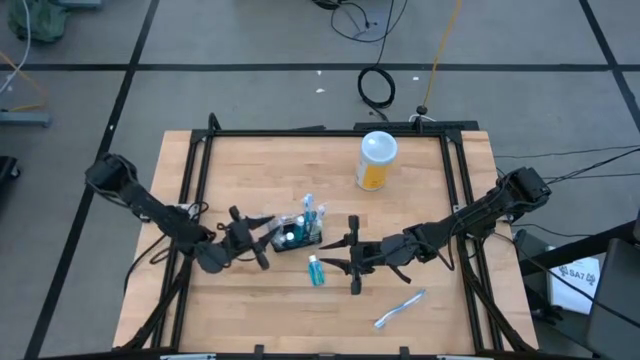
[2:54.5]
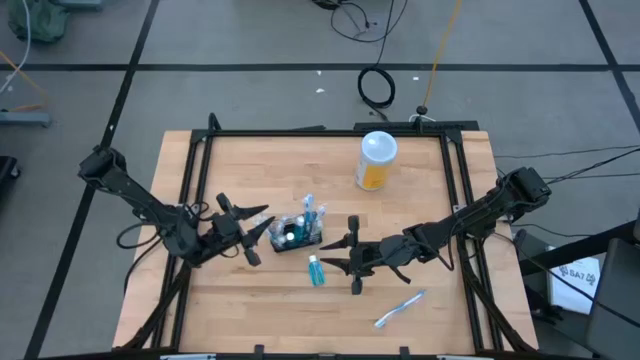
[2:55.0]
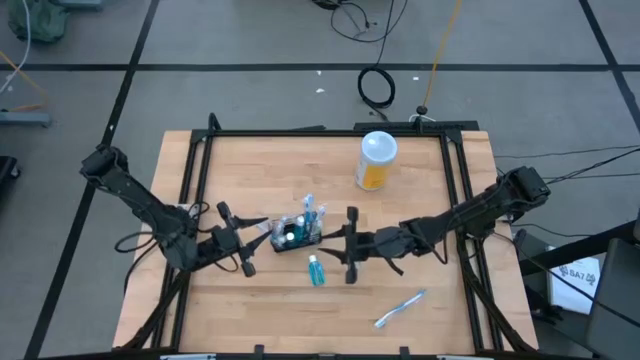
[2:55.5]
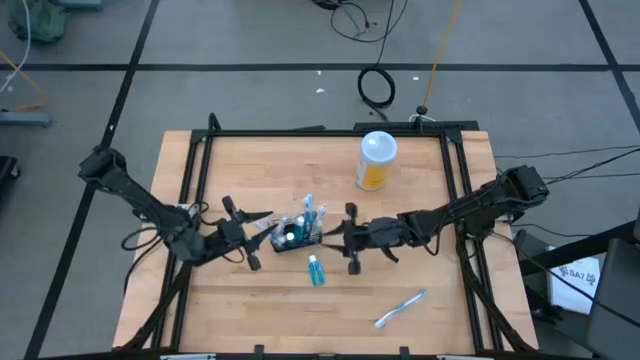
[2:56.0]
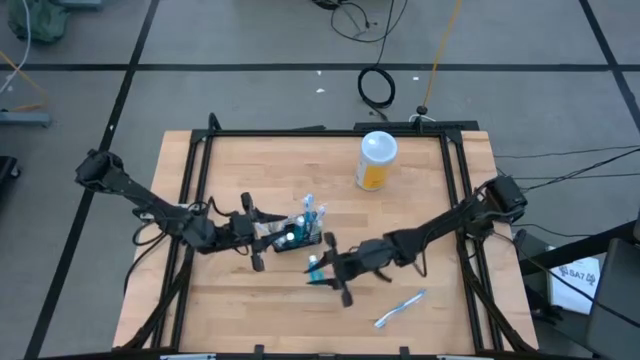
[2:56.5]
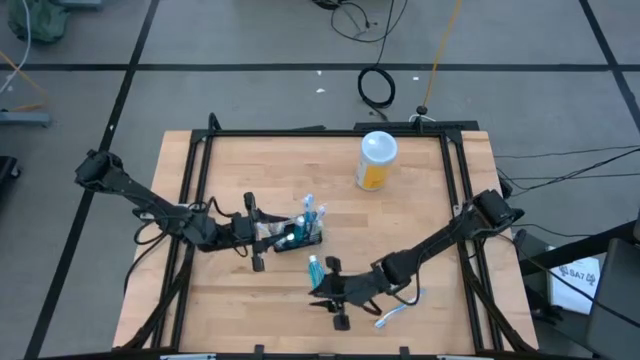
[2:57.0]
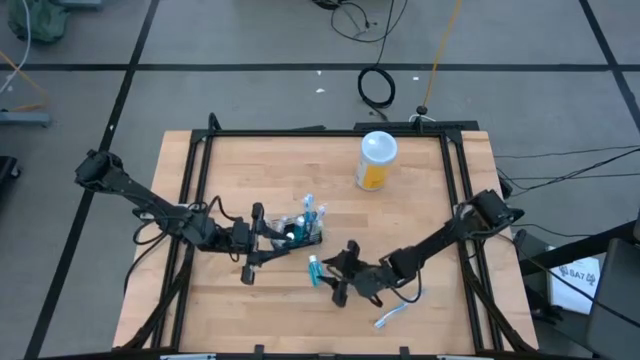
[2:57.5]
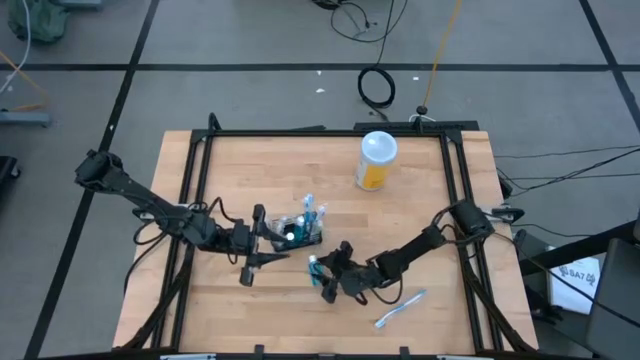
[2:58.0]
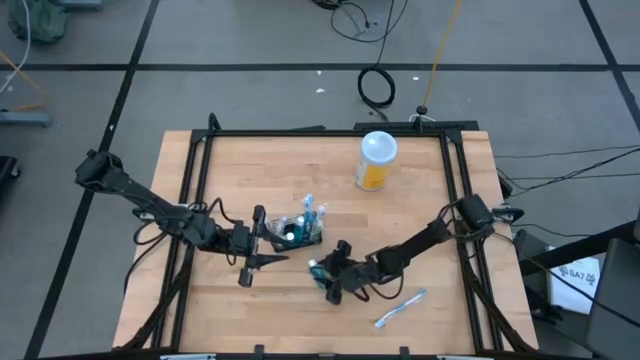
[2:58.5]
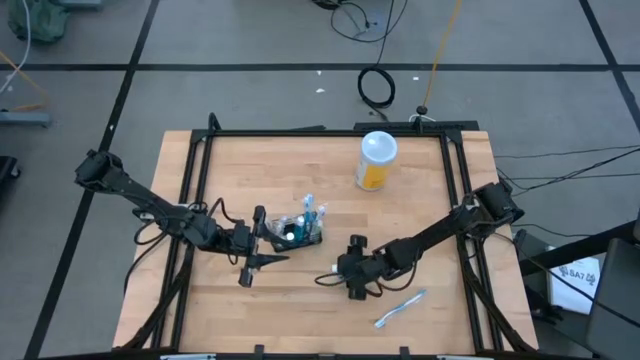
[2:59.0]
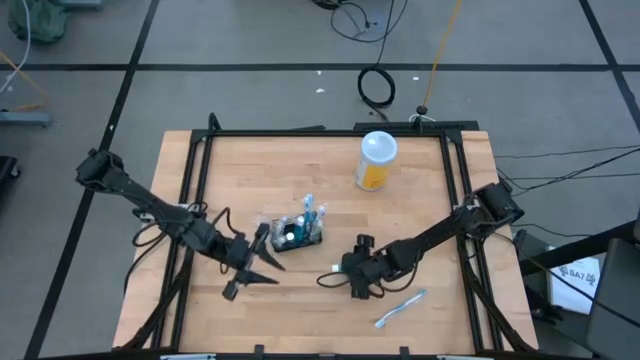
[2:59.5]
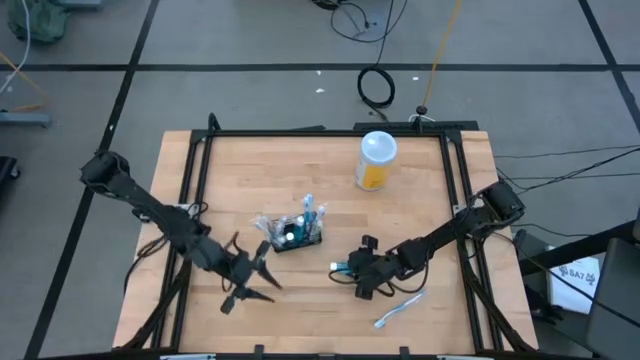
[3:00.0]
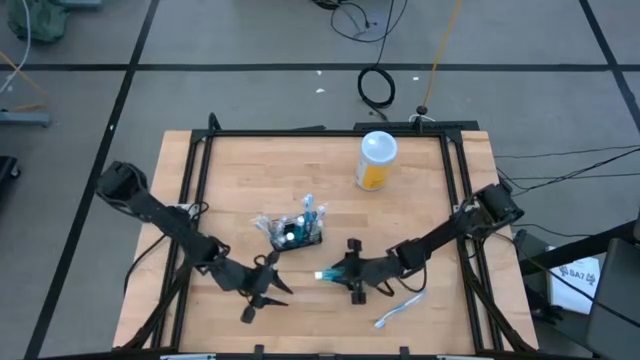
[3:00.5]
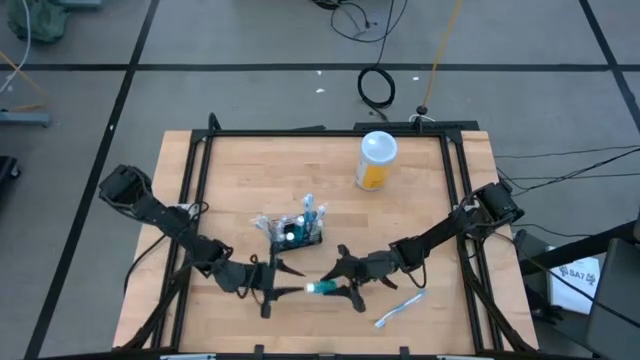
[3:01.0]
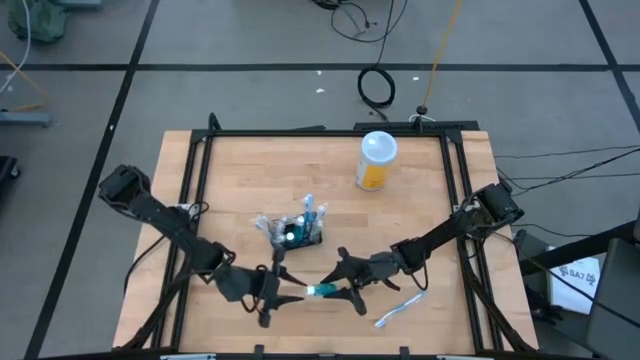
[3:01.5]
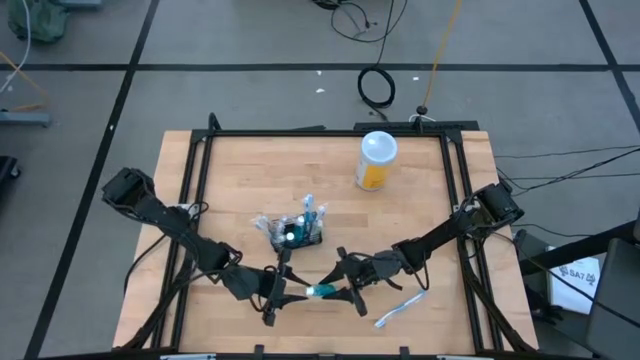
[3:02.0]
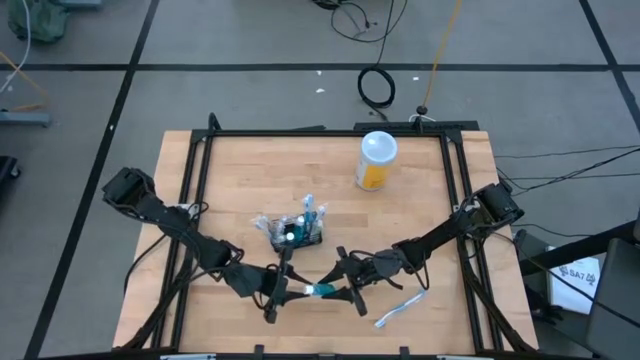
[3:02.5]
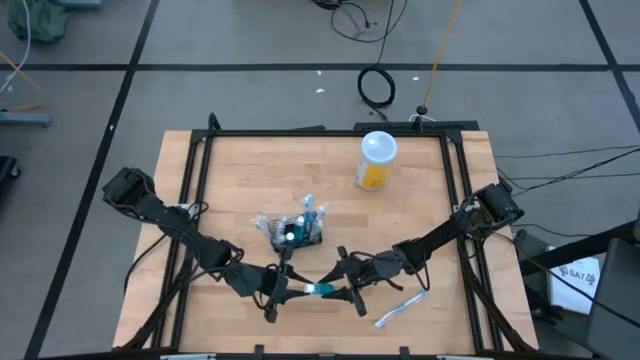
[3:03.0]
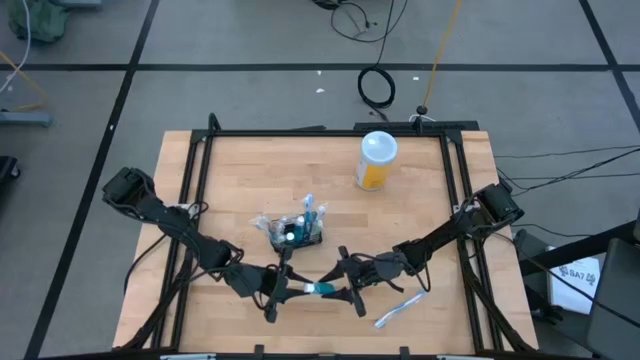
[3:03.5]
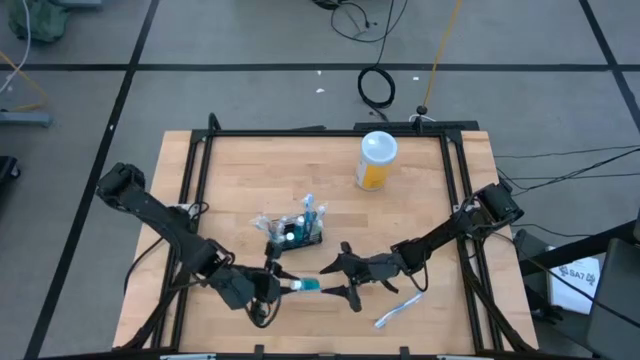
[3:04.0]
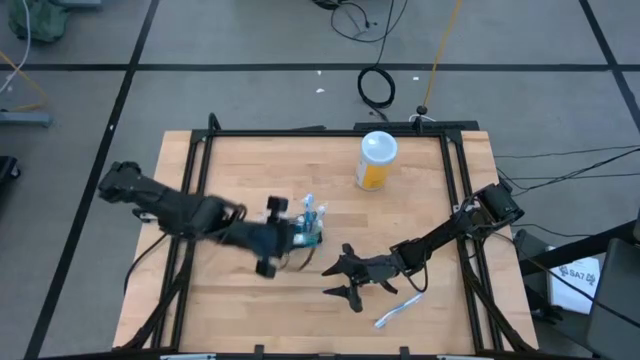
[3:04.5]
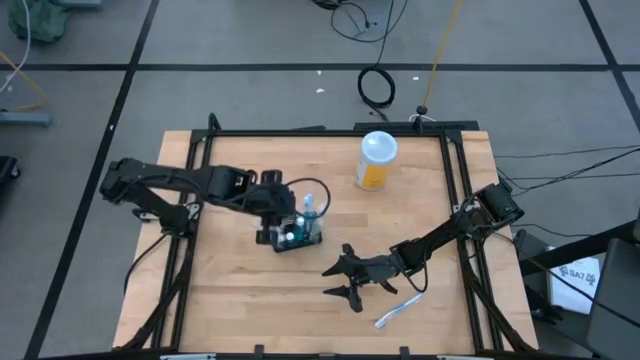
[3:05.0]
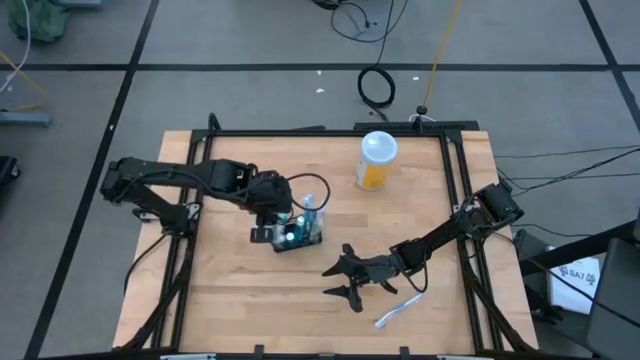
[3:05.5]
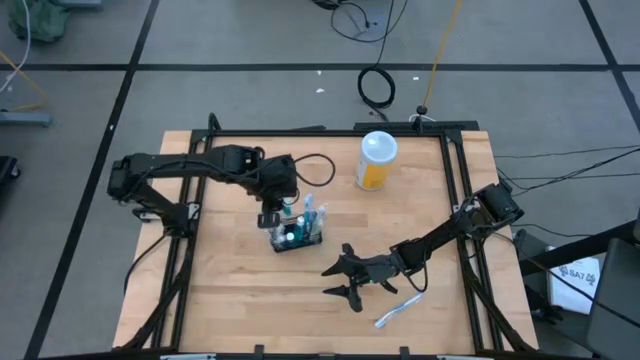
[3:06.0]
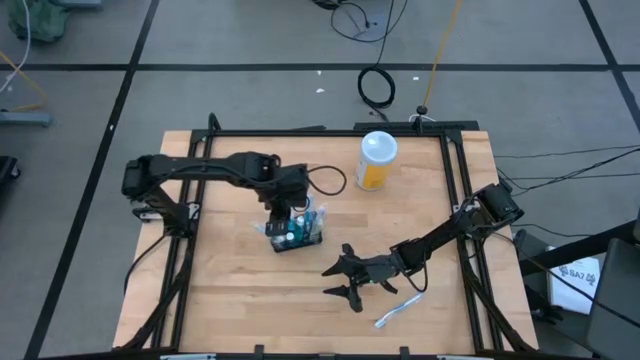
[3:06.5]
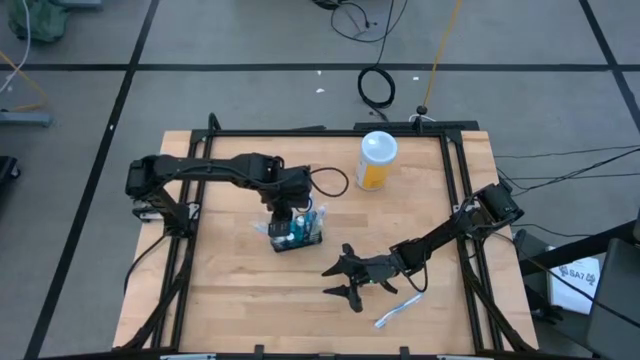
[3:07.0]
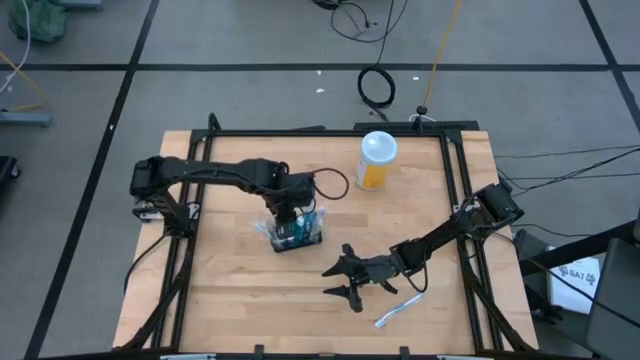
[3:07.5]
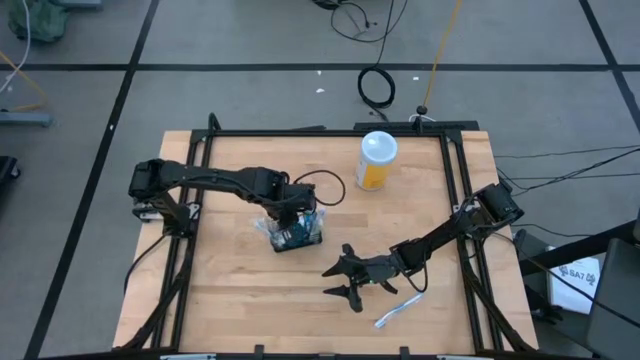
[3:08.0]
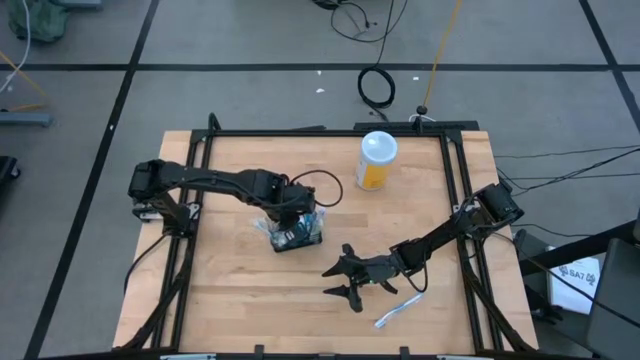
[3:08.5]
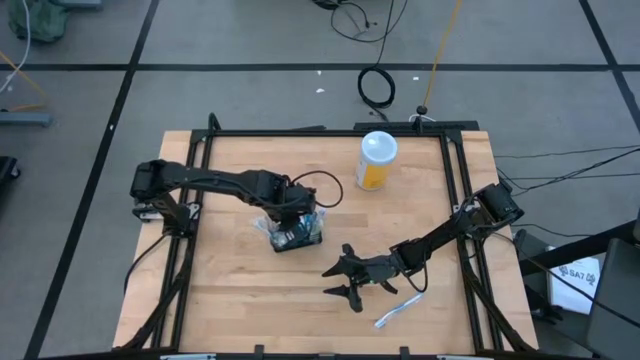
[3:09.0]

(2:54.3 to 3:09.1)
Task: Pick & Place toothbrushing station
Put the mouthwash bottle into the black wire organizer

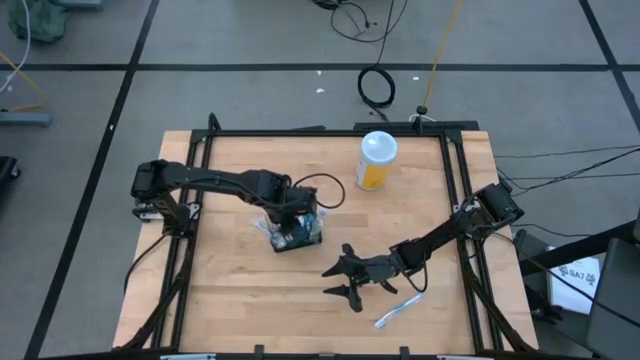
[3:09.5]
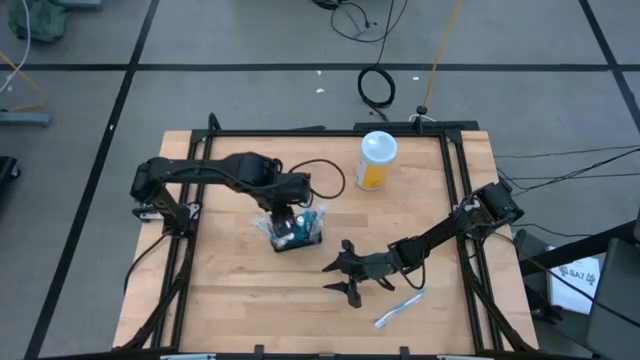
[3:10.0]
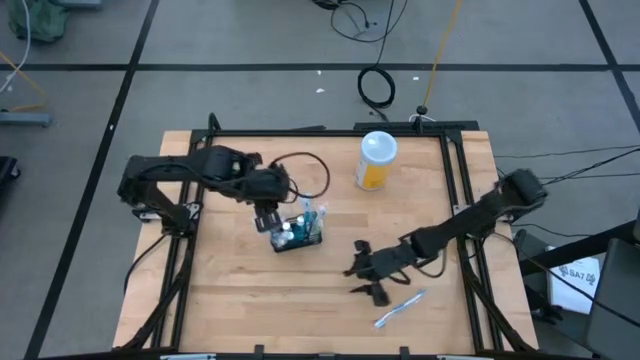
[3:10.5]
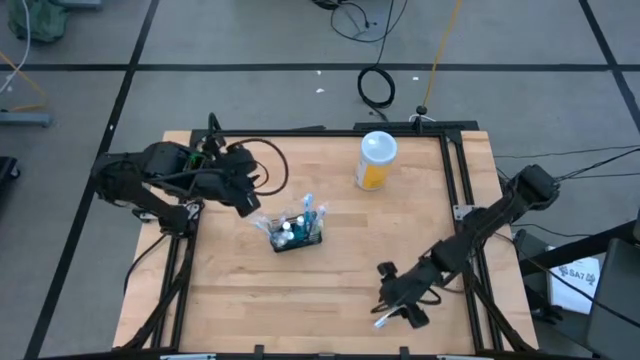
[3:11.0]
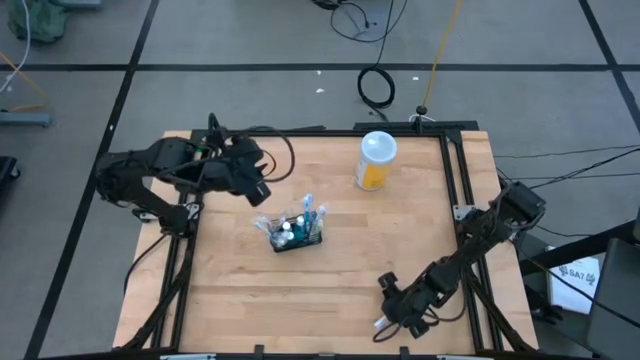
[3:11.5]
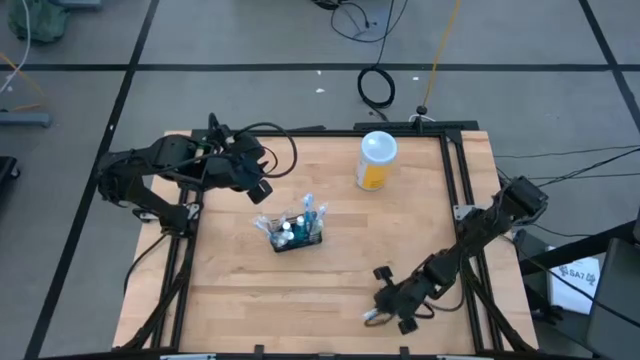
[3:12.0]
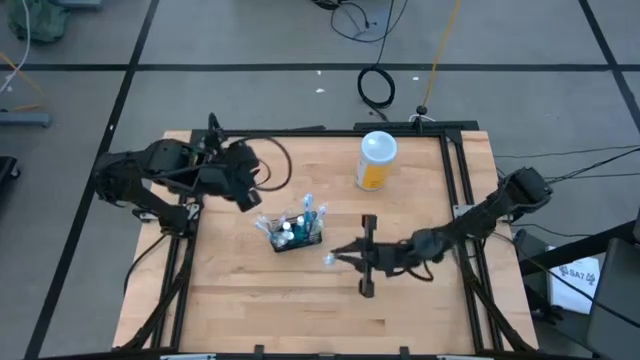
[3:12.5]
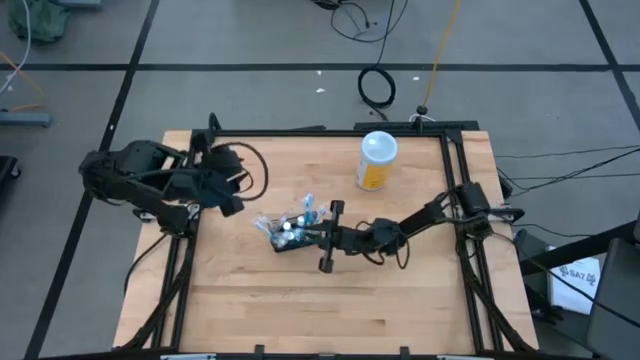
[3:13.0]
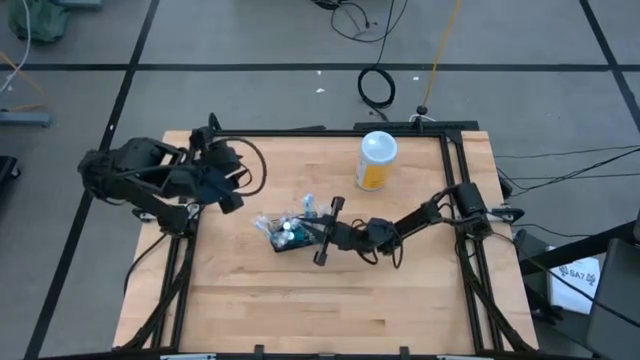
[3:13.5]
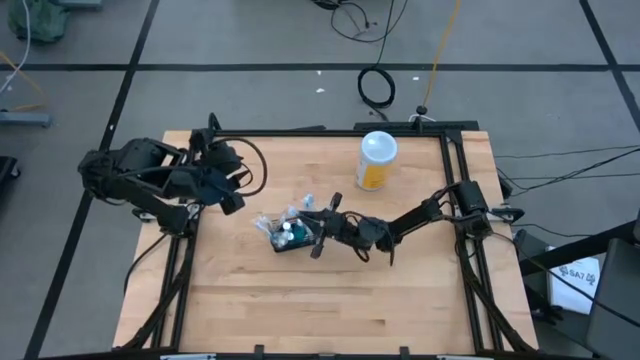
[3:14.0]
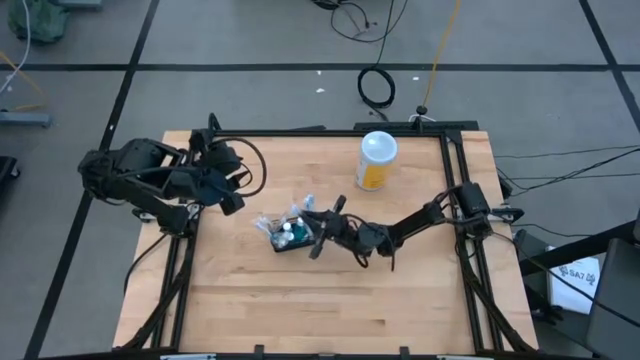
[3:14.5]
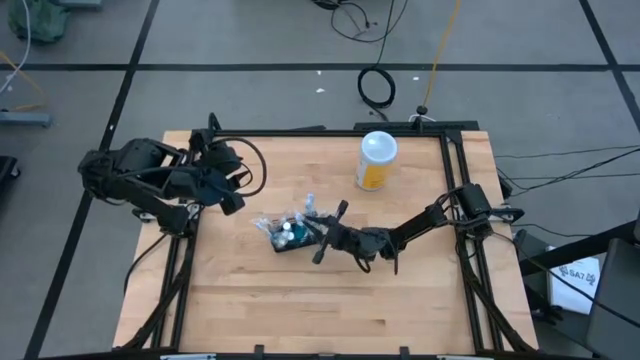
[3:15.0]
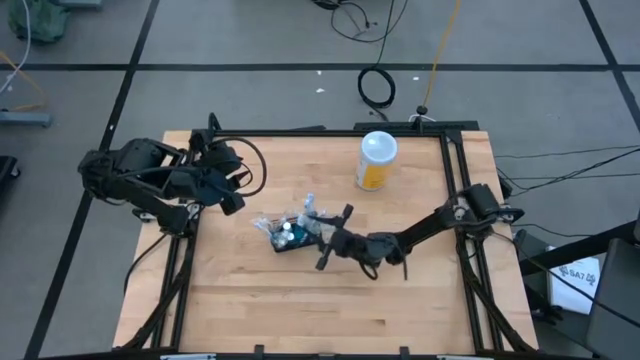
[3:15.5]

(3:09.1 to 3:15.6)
Put the blue toothbrush into the black wire organizer
